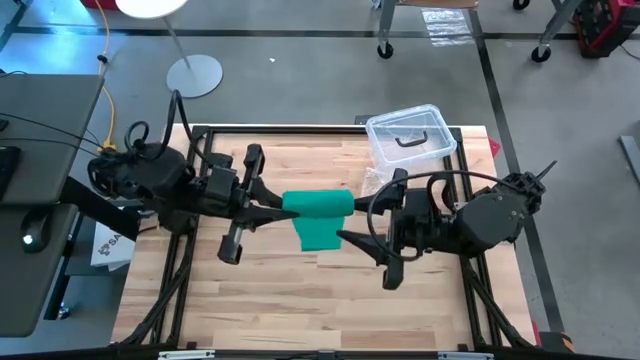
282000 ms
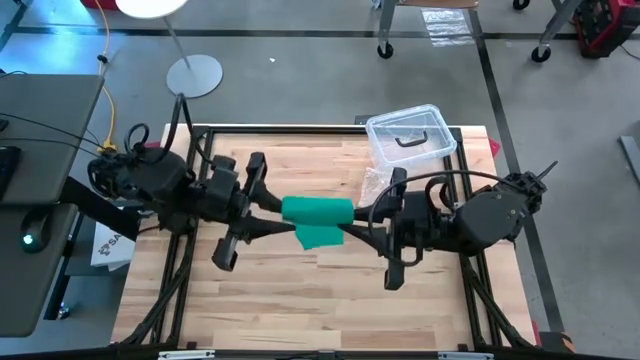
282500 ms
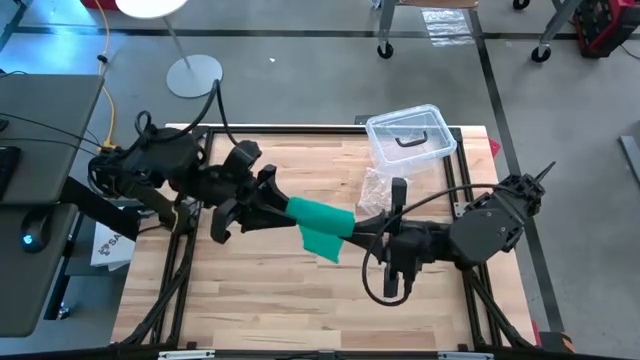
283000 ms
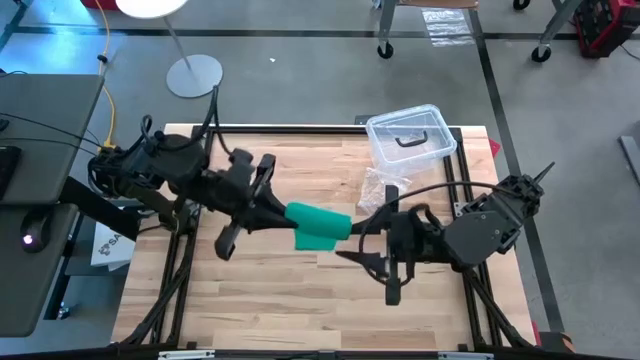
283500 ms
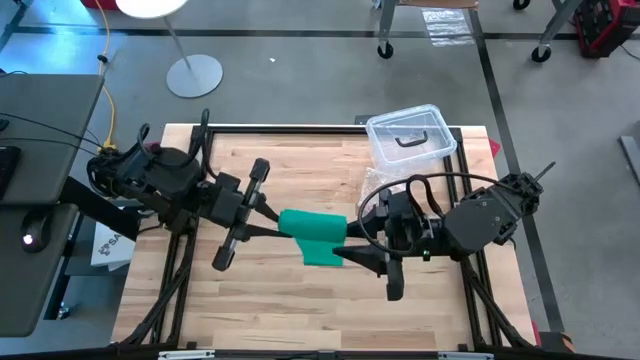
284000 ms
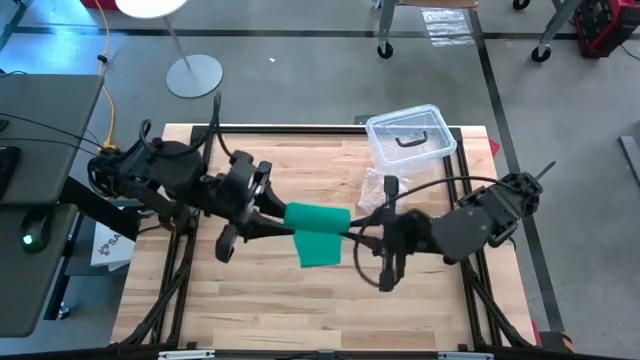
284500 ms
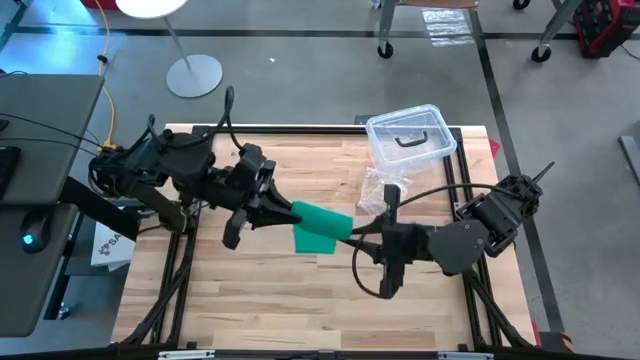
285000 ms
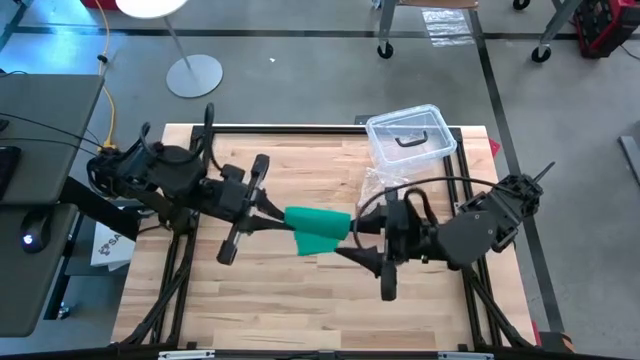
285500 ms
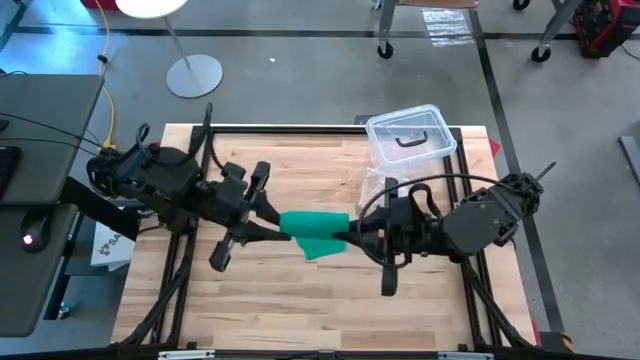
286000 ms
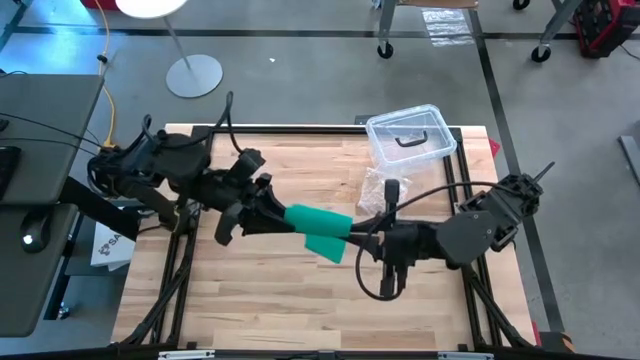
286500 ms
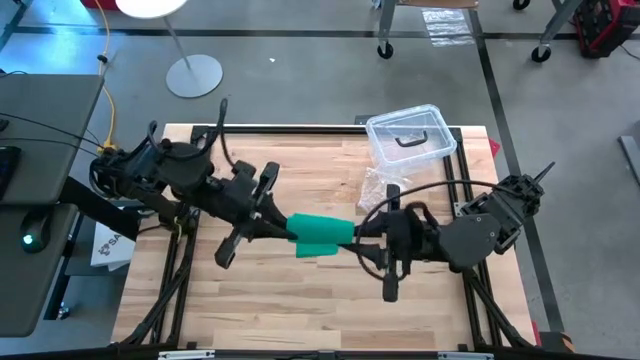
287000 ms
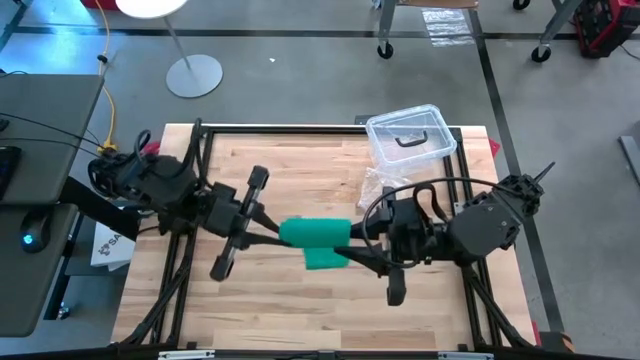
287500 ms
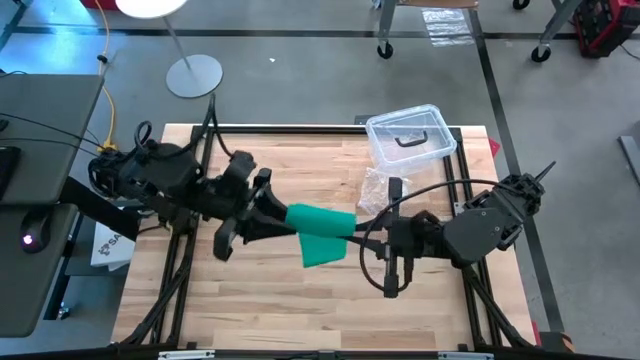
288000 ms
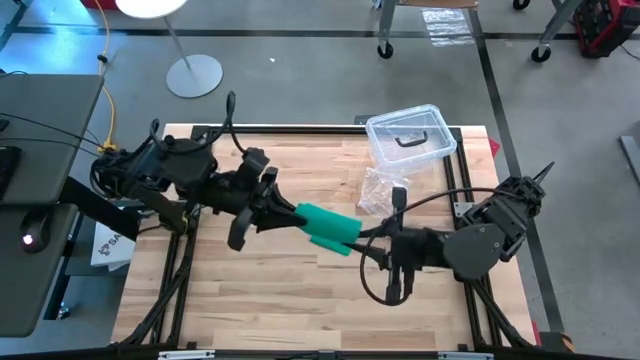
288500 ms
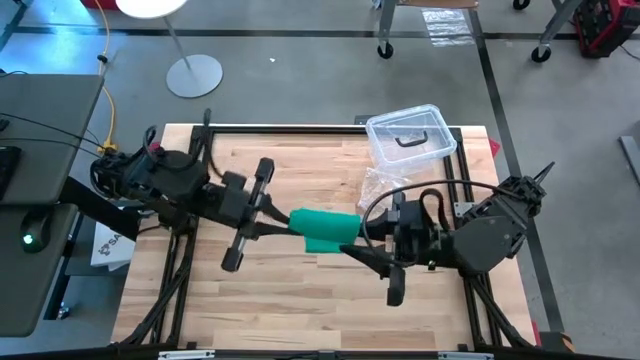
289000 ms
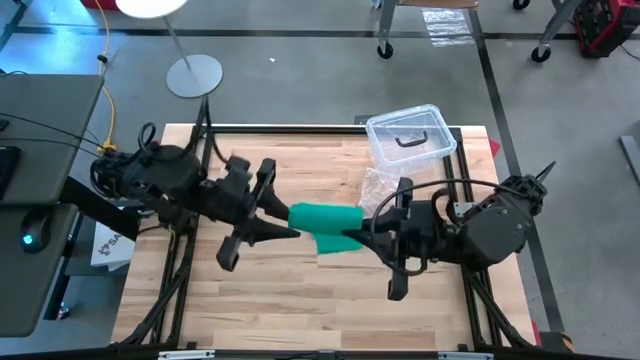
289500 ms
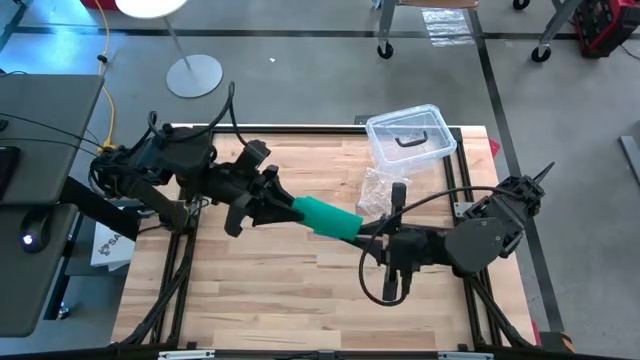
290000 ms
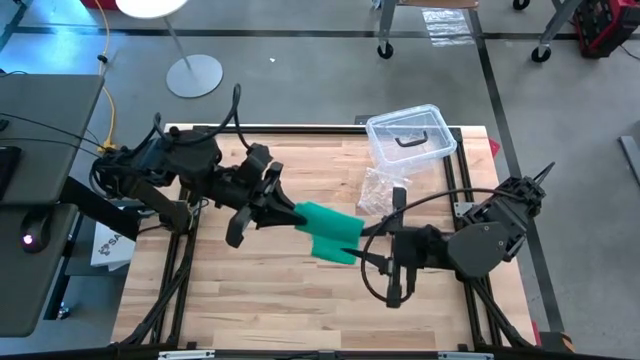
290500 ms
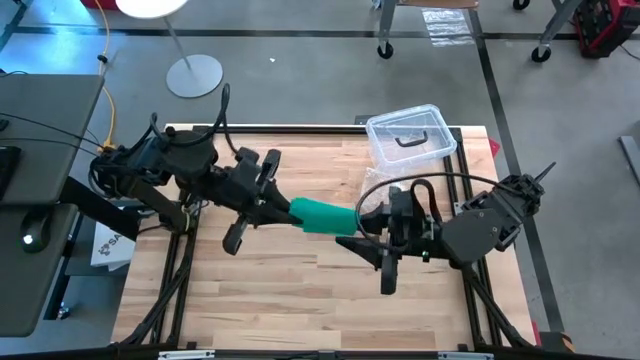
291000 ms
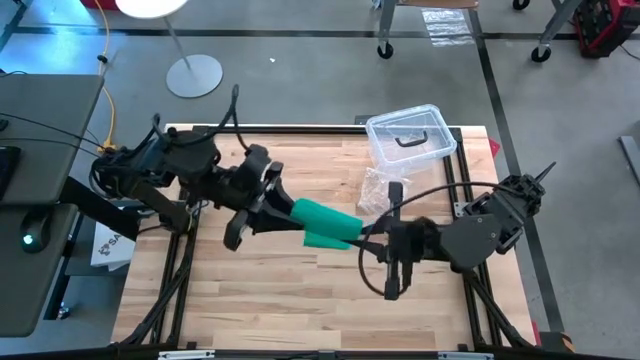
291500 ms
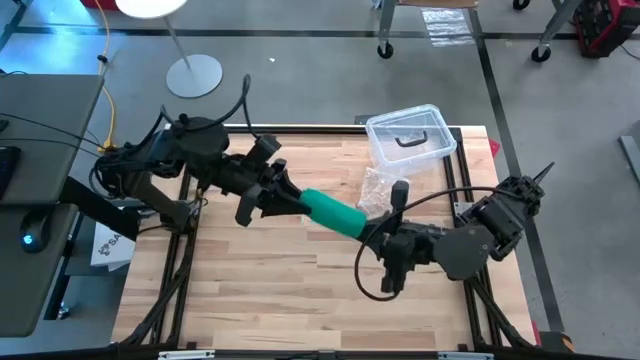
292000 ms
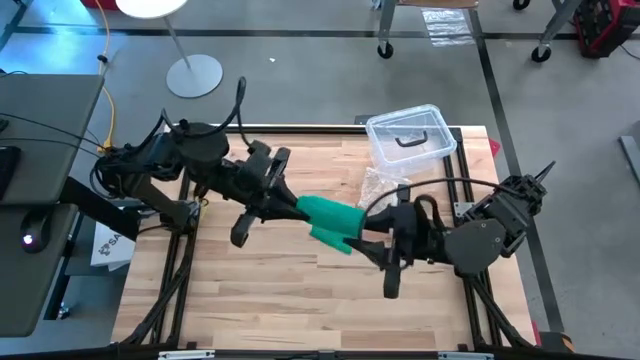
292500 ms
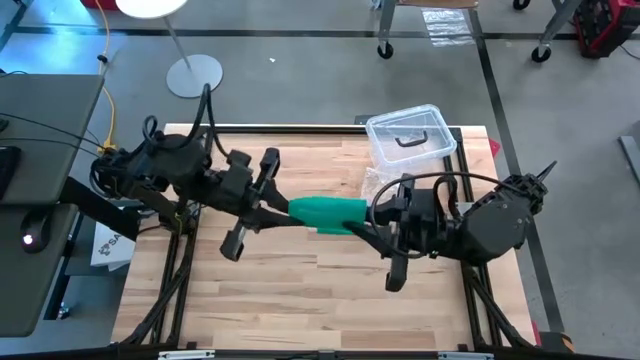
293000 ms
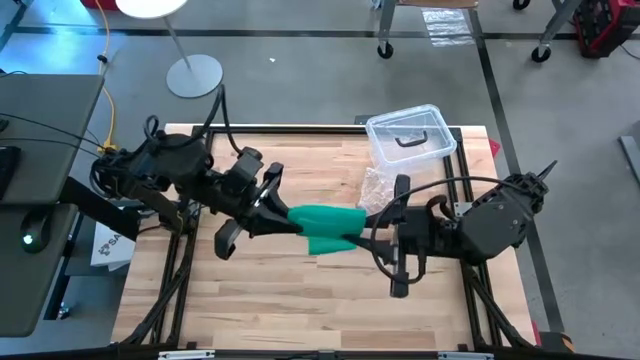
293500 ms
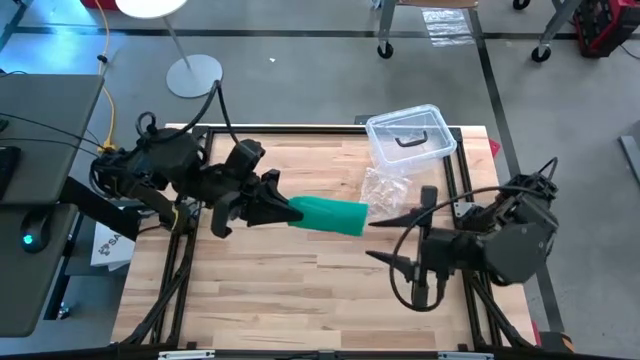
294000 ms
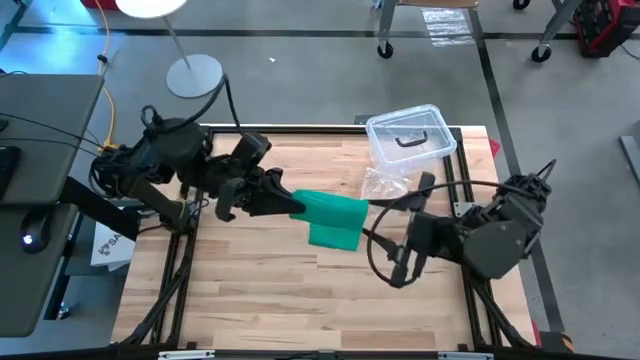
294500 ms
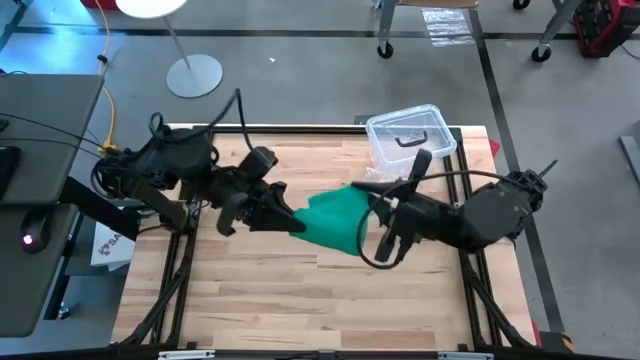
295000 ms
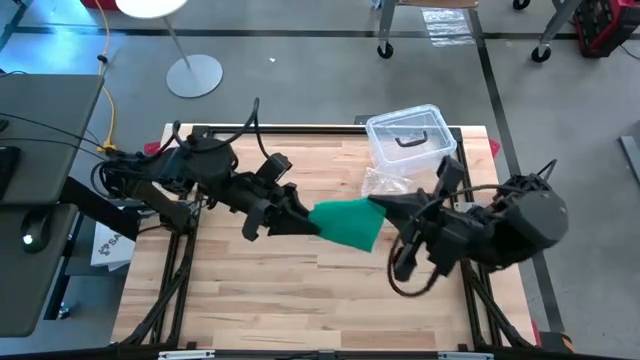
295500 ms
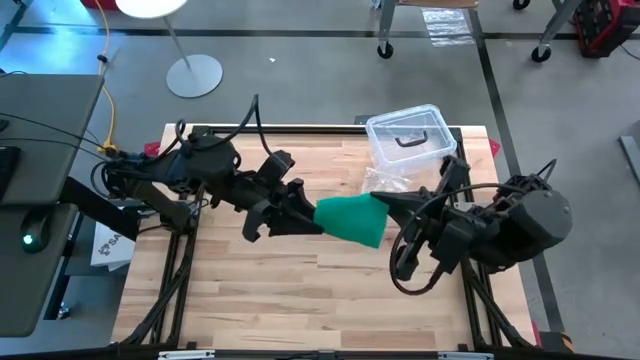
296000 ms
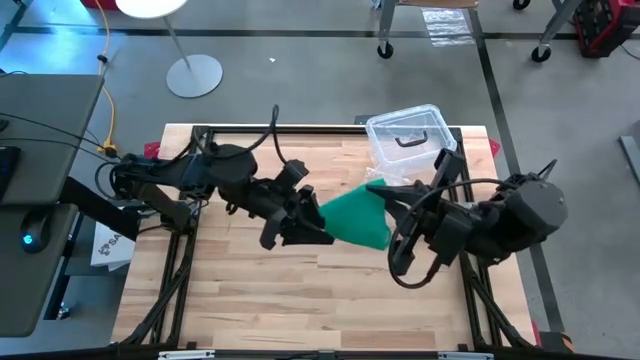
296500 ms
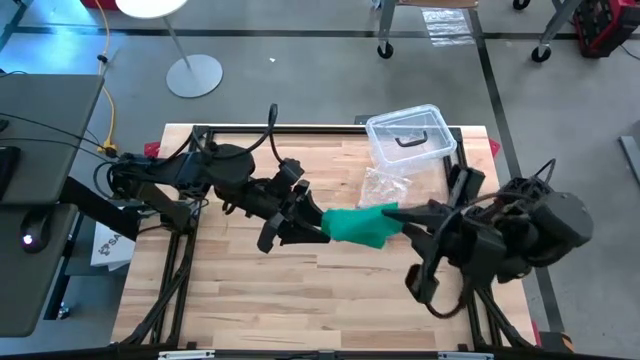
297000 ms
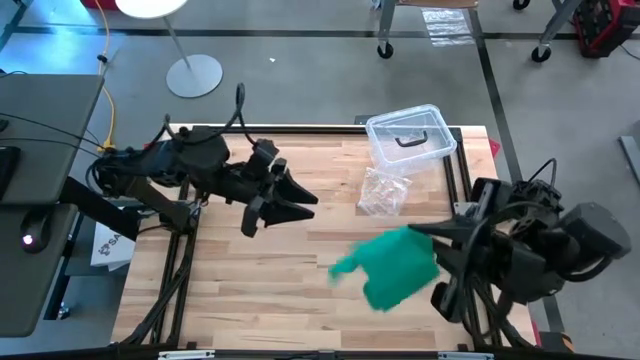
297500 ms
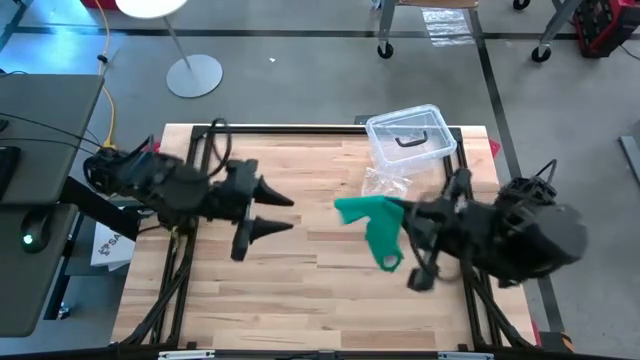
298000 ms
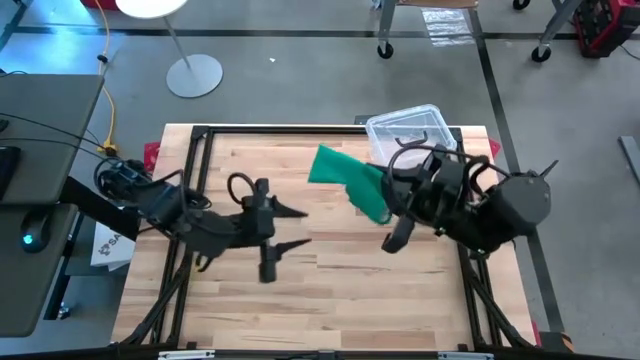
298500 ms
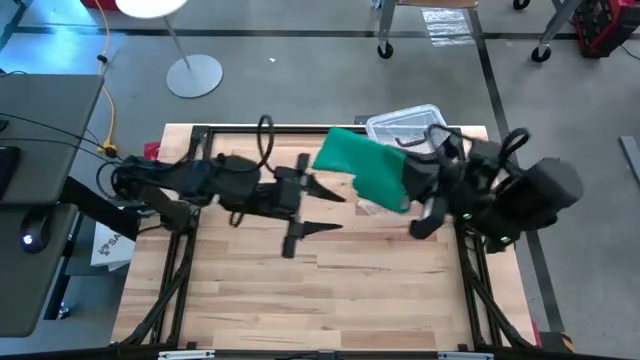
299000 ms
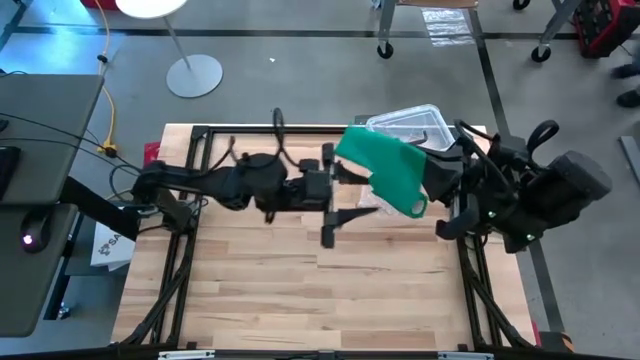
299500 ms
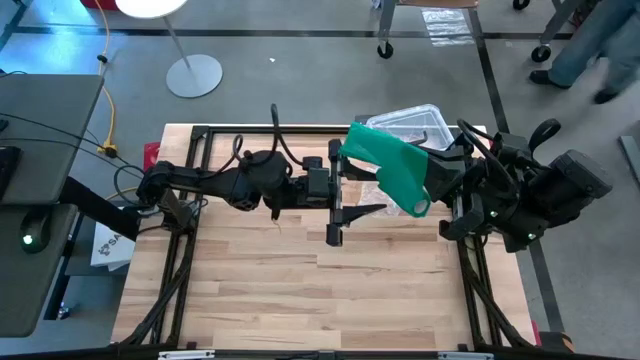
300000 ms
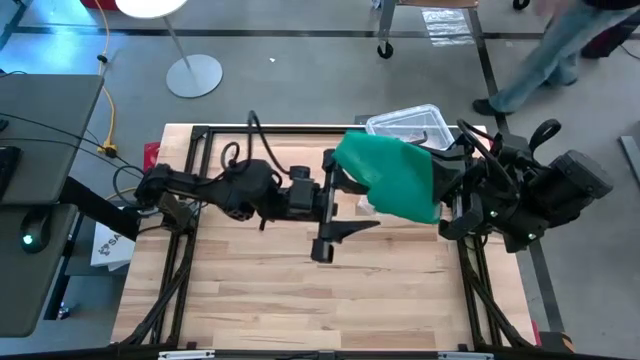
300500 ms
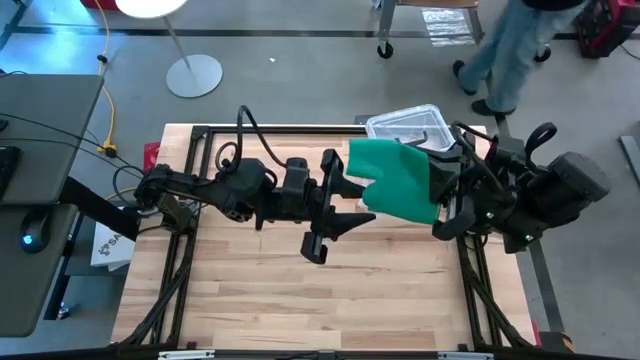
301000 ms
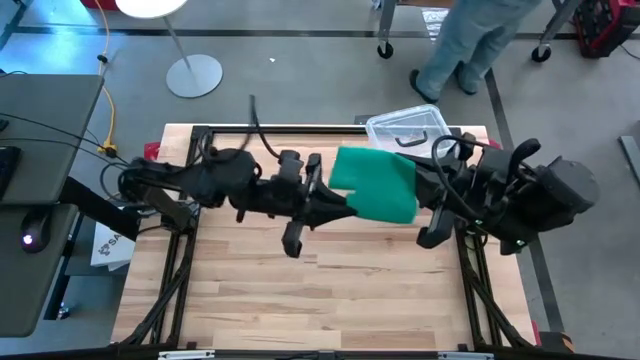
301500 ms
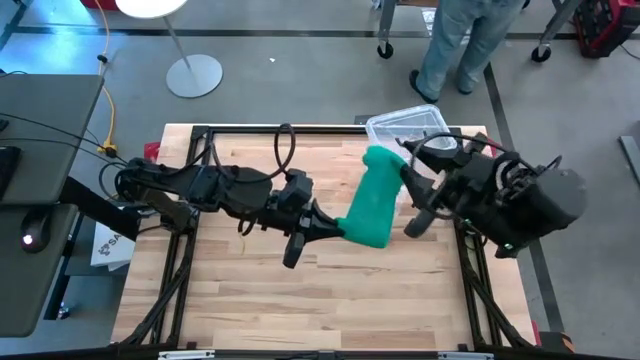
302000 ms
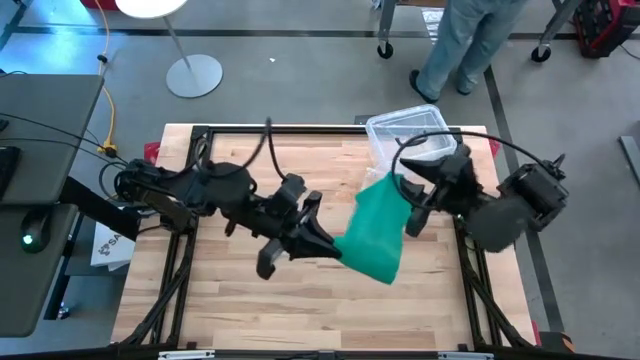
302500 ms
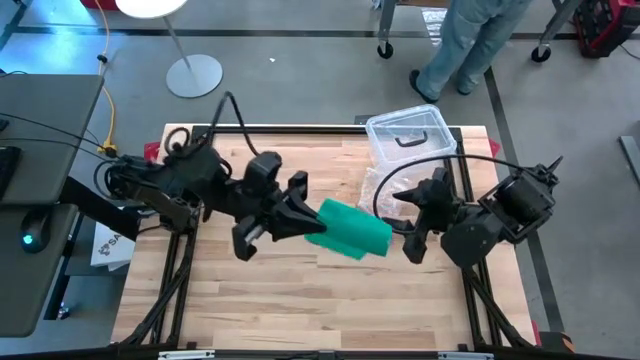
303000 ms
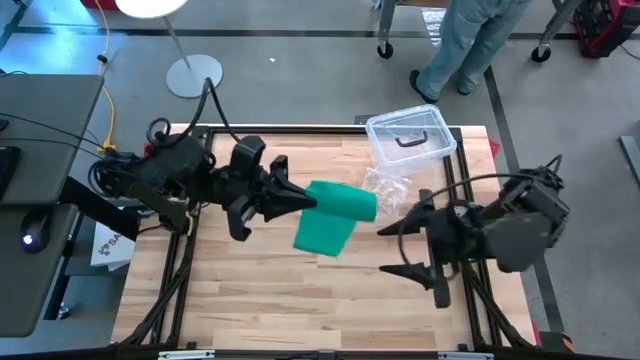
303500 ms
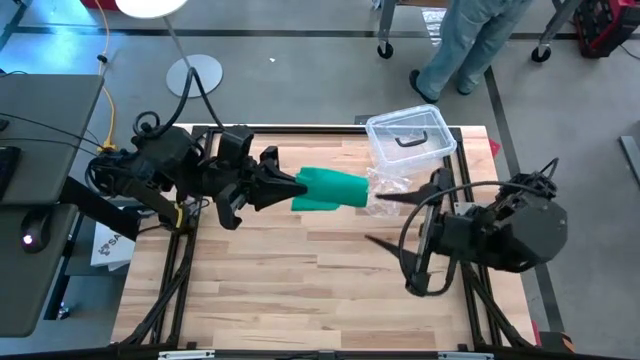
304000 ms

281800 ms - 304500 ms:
Task: Roll bandage
Roll the green bandage
